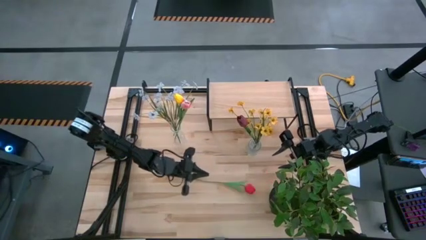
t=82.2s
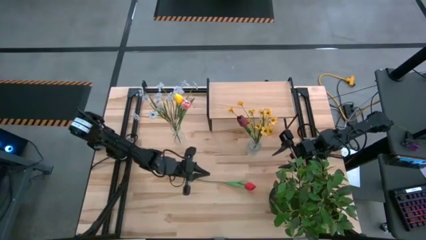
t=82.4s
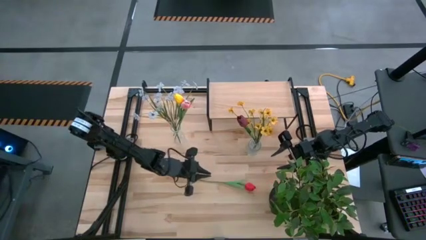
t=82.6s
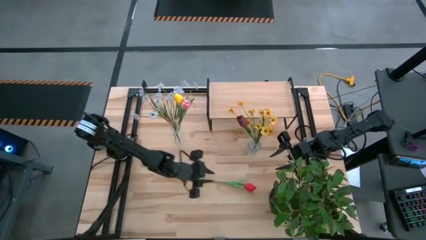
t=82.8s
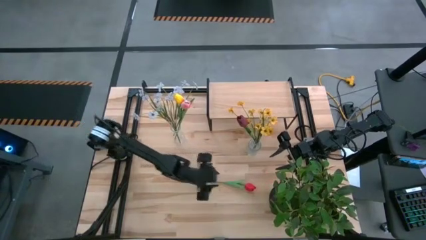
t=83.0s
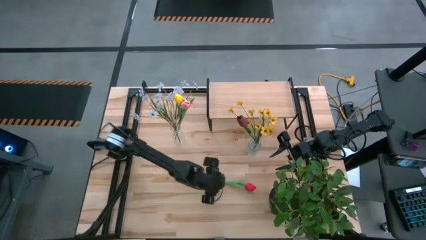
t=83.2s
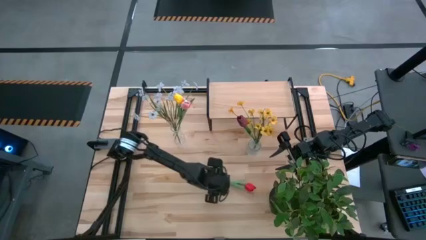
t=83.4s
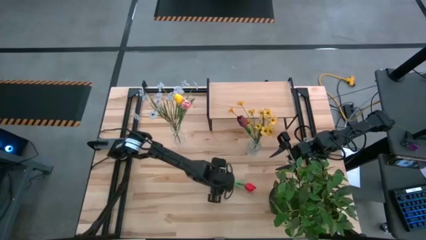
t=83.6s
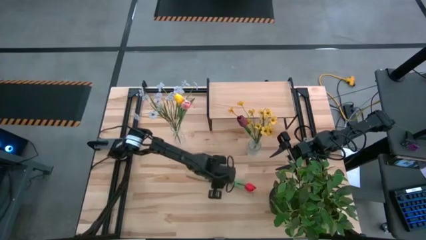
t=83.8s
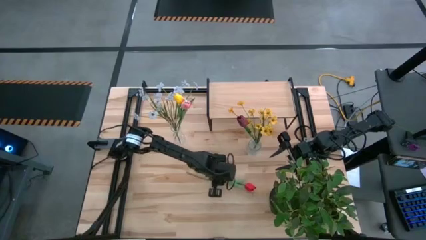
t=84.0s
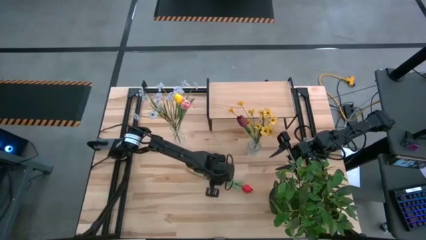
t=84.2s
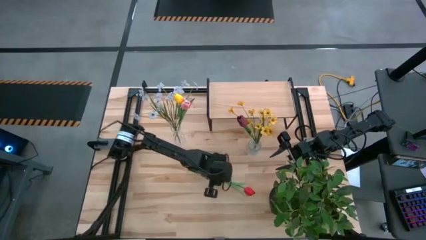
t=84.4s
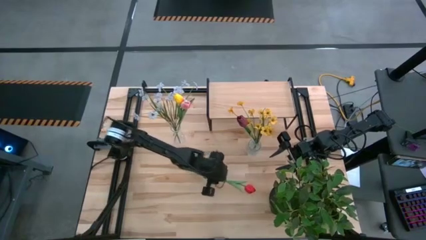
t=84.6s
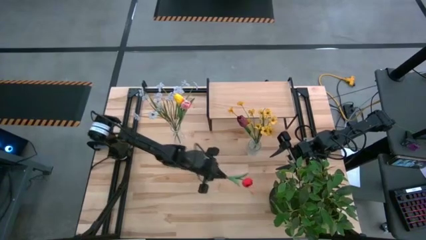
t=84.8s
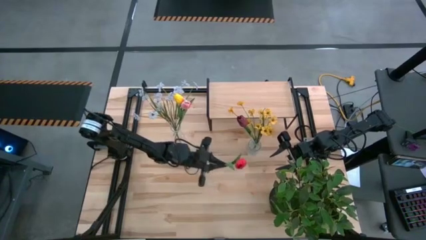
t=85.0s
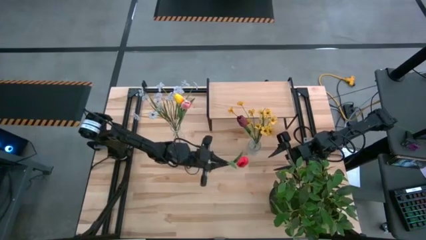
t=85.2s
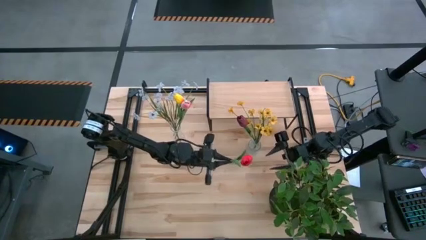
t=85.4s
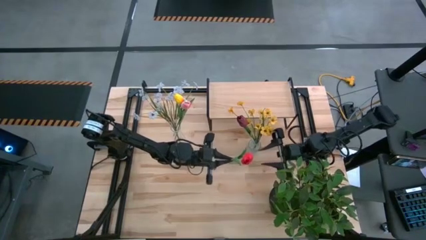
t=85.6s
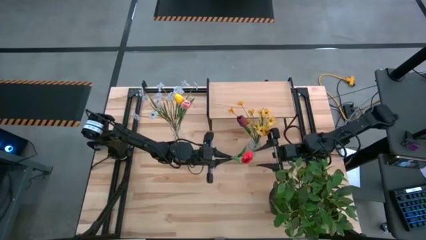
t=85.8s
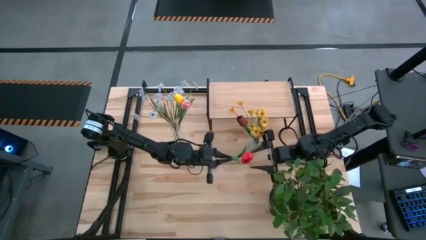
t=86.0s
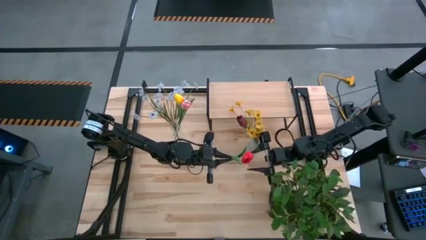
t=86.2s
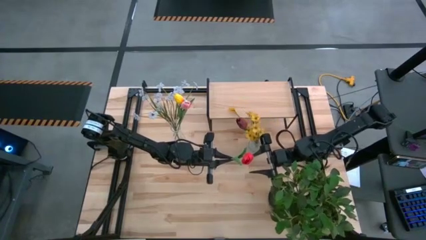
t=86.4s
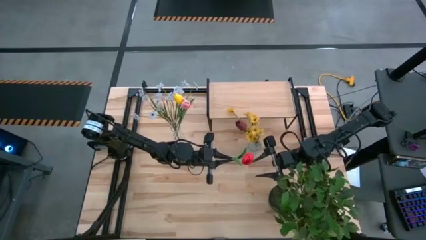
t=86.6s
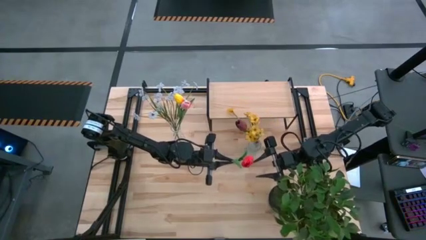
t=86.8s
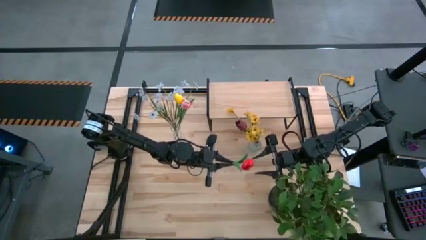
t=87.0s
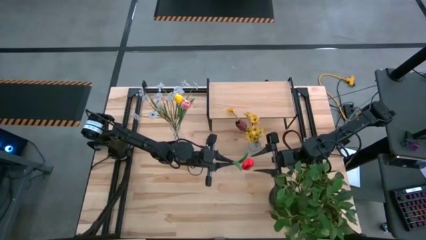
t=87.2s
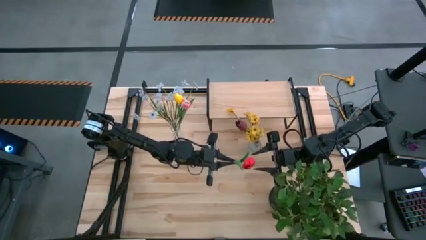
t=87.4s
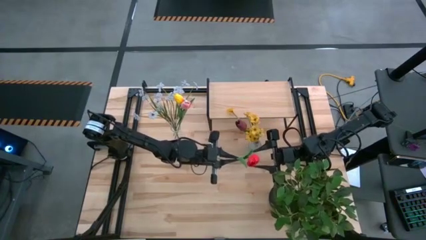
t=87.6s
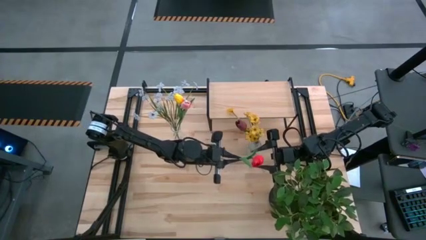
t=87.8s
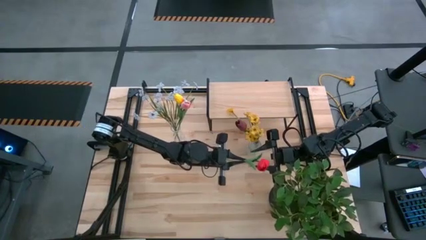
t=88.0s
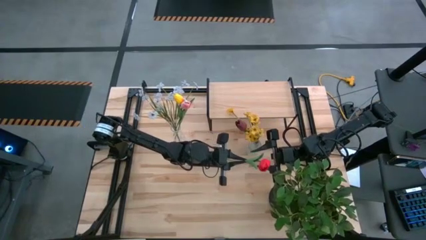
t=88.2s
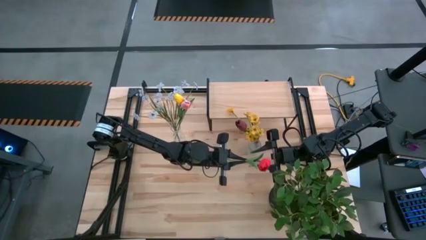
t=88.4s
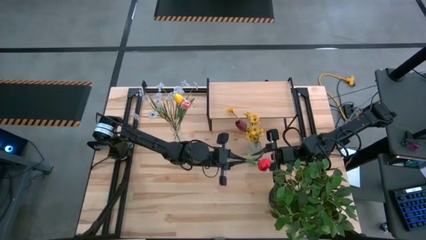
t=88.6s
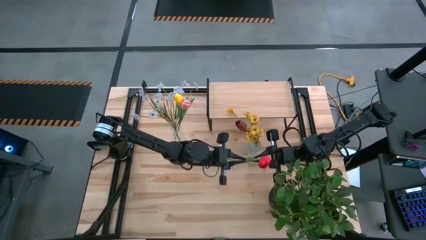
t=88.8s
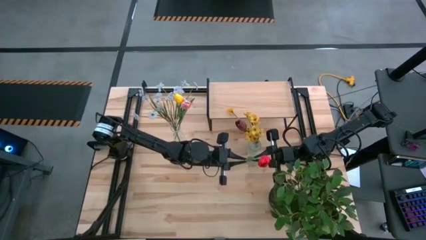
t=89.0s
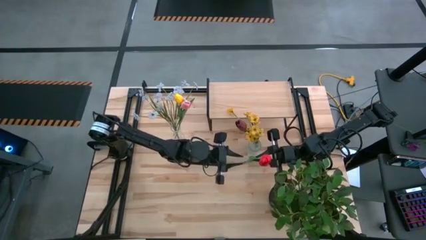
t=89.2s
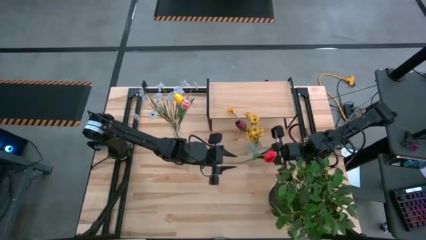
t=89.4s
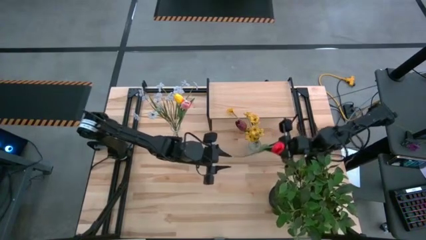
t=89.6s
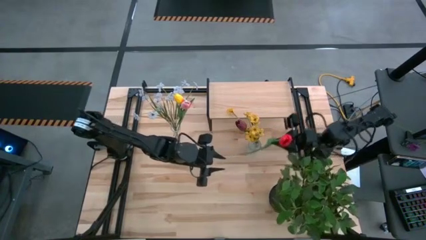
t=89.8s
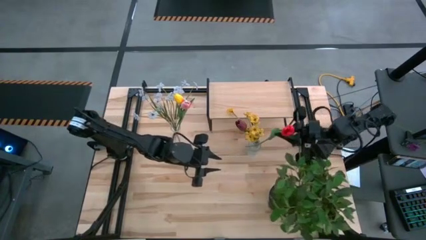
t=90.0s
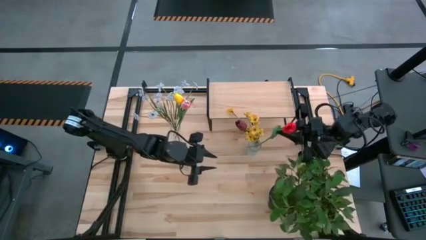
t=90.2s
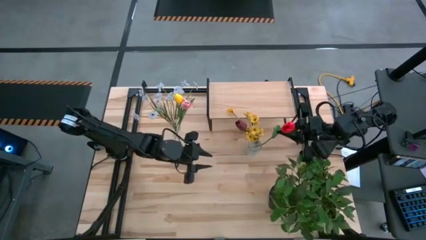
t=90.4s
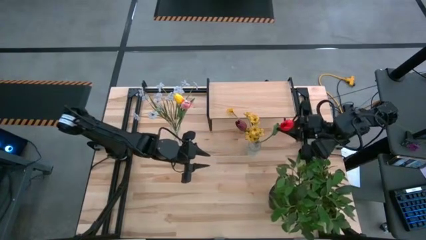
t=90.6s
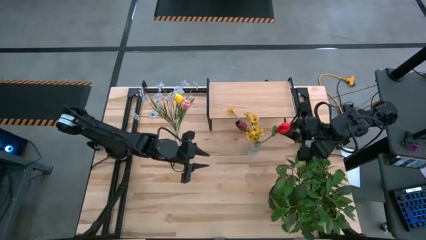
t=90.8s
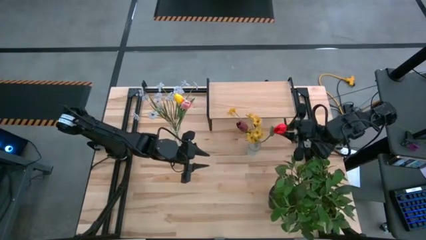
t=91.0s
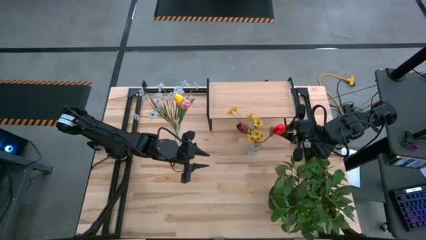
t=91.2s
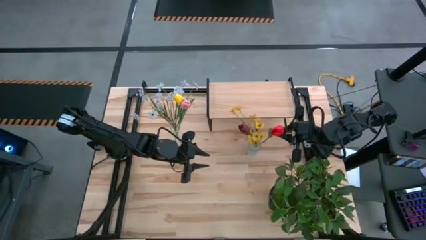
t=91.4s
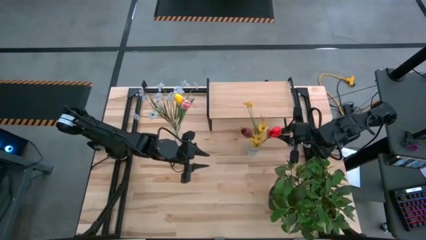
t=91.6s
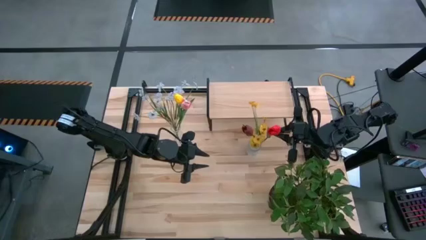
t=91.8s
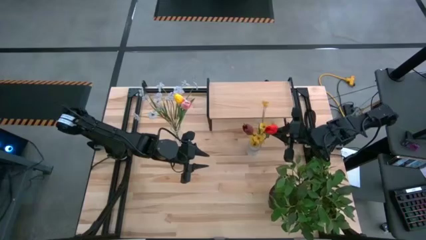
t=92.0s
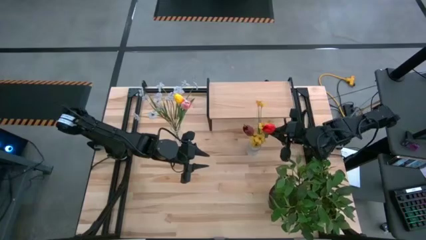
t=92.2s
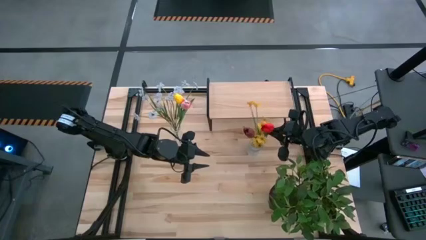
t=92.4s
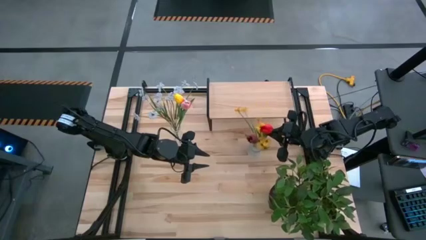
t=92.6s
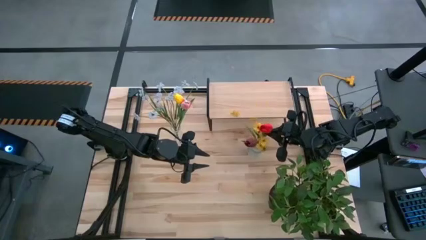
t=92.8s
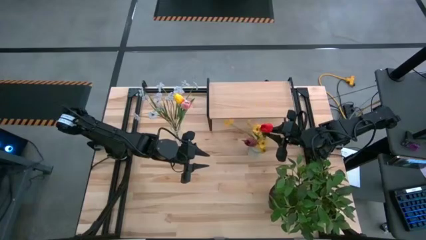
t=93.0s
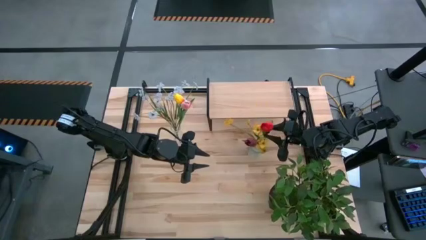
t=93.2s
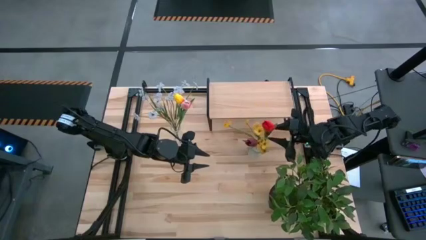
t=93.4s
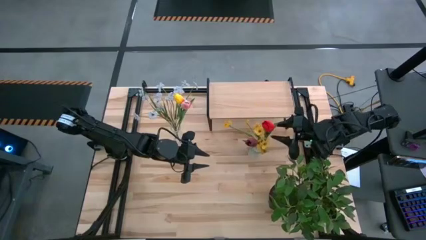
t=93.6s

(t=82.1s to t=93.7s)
Task: Pick and place flowers into a vace then onto a shelf
Put the red flower into the right transparent vase

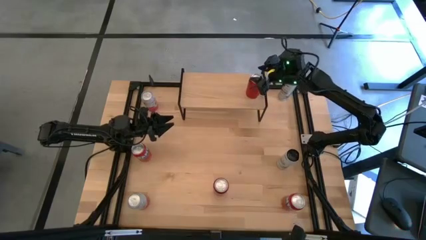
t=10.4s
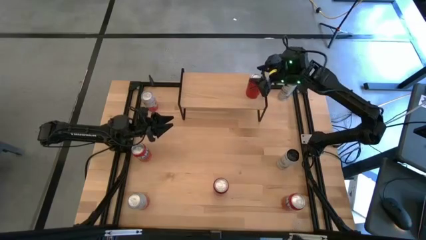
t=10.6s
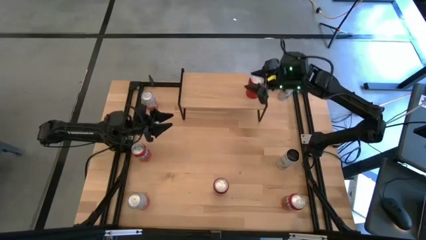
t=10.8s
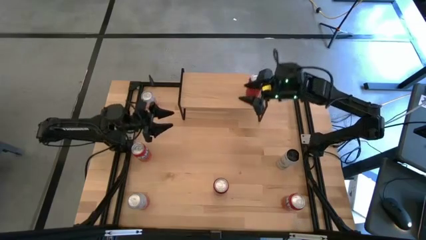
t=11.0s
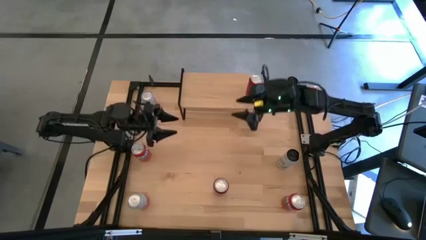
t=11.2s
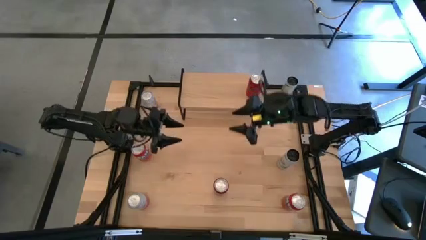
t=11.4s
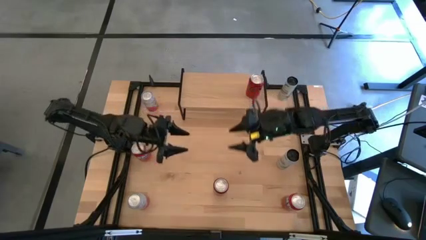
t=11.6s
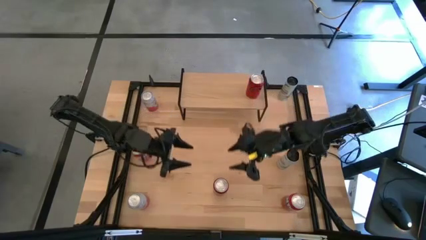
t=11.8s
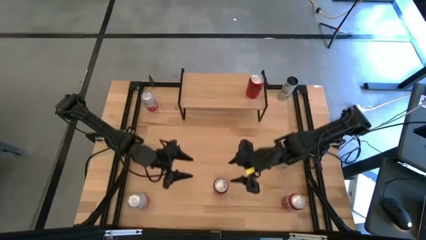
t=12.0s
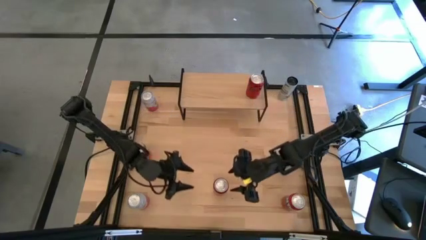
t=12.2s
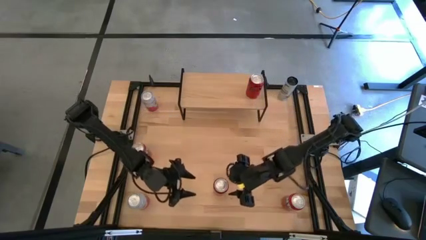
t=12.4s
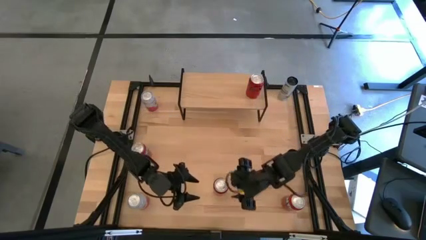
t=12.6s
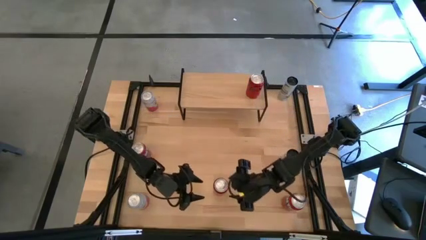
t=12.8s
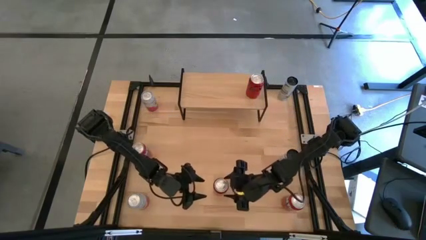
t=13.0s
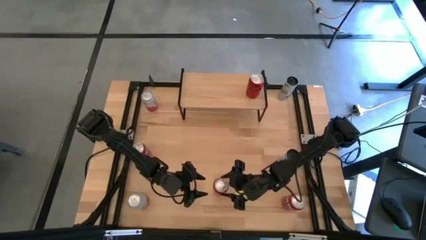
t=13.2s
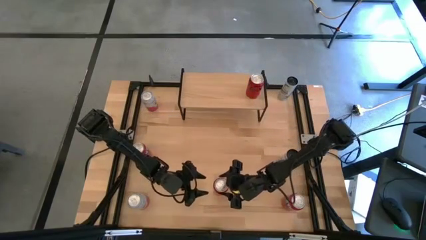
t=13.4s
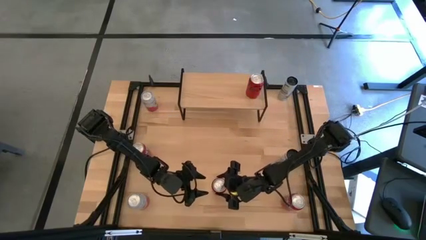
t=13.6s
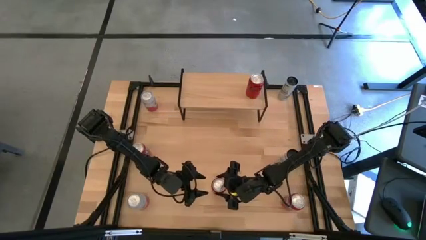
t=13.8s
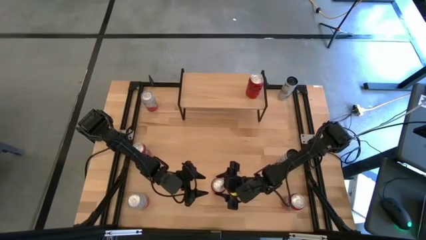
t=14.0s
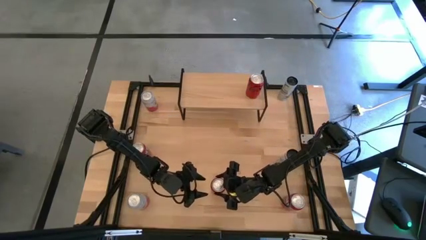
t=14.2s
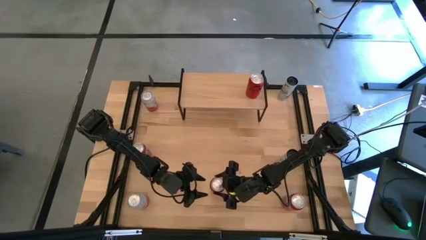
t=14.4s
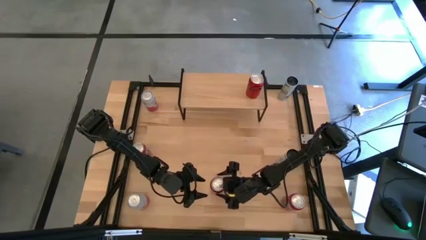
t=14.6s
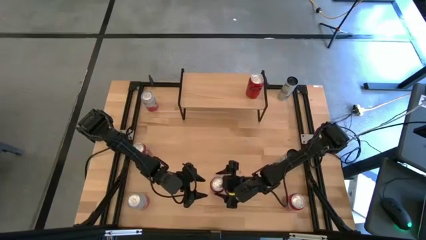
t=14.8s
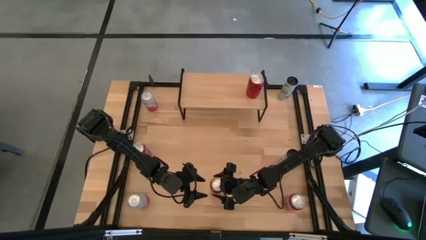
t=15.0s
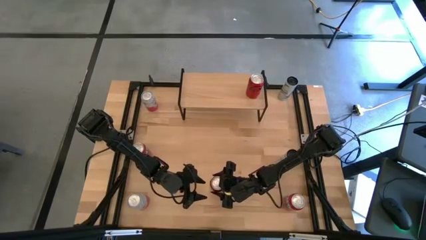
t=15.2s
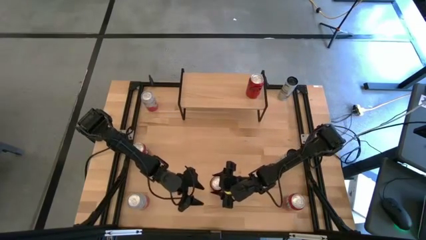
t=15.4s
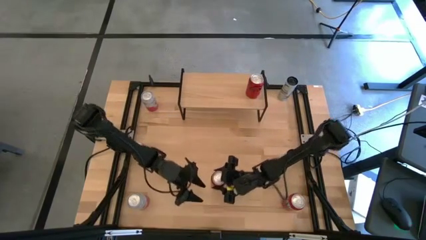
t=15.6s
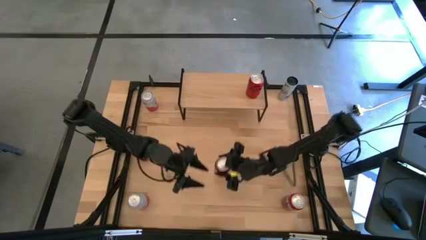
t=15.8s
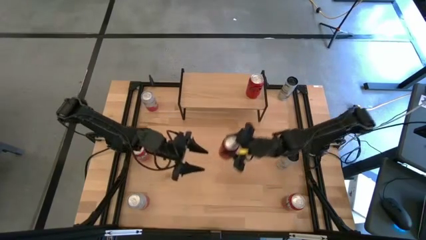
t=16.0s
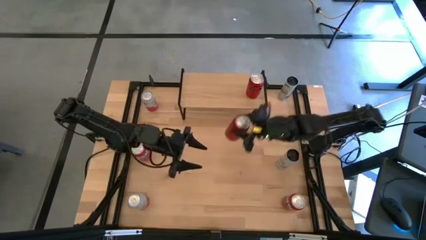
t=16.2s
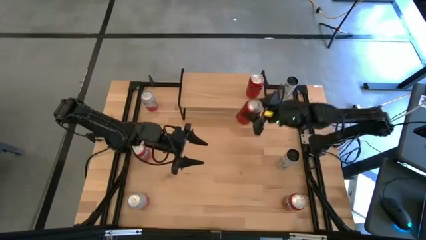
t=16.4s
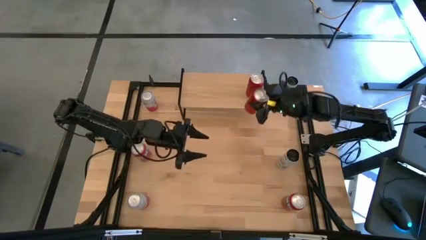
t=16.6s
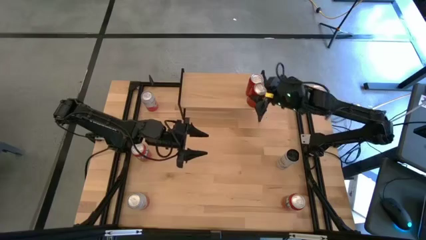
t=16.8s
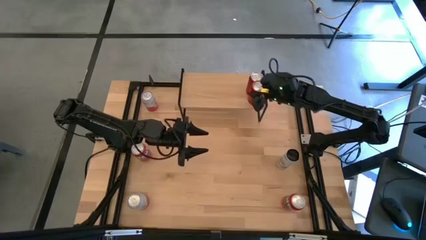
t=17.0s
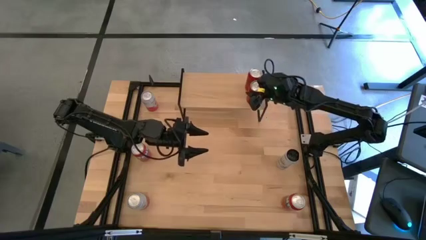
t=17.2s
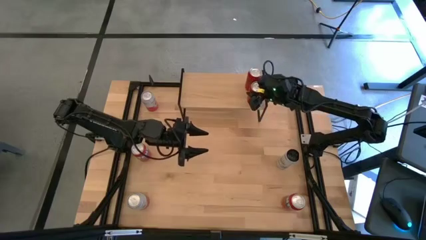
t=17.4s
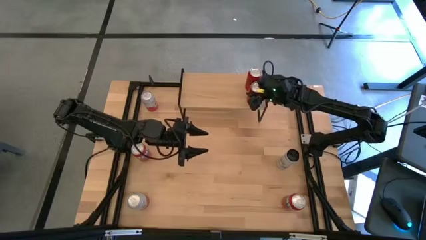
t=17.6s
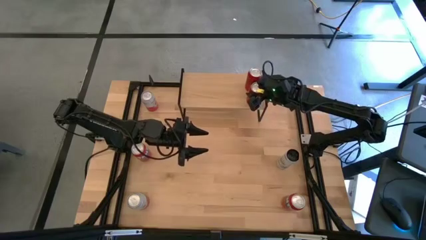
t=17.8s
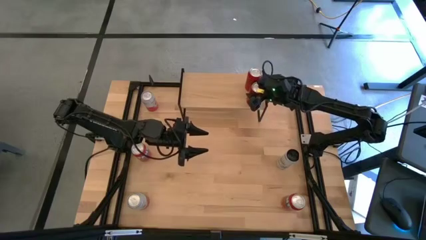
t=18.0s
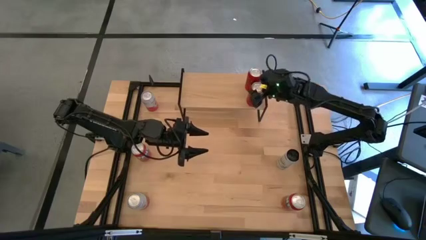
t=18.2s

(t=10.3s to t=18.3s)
Task: Place canned beverage on shelf
Put the red soda can aligned with the other red soda can on the shelf
